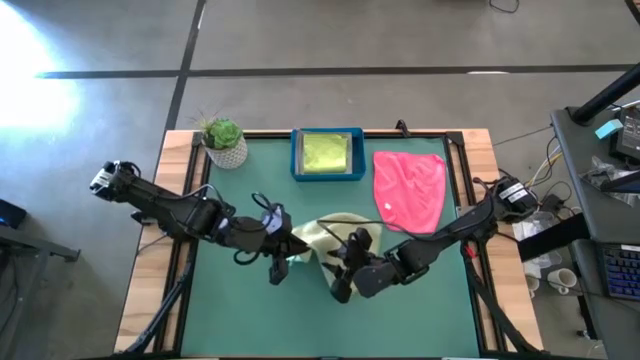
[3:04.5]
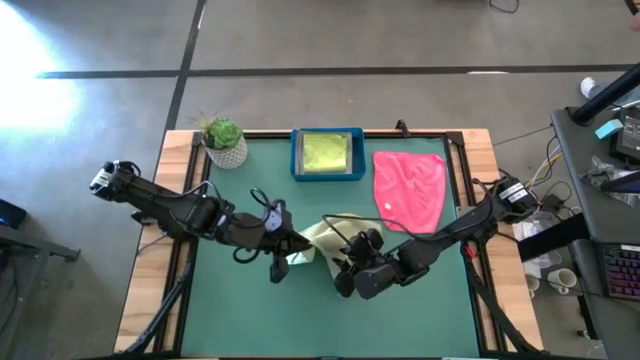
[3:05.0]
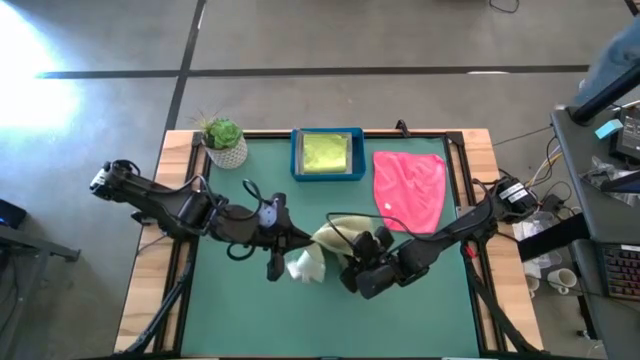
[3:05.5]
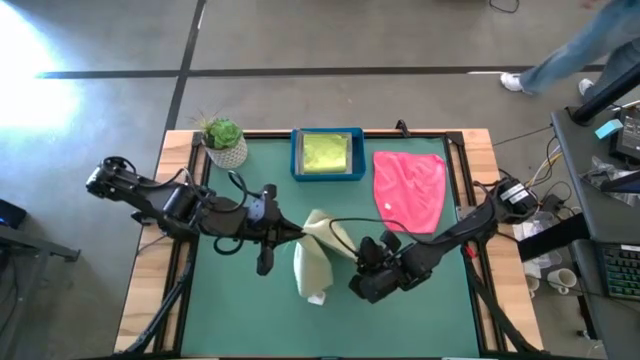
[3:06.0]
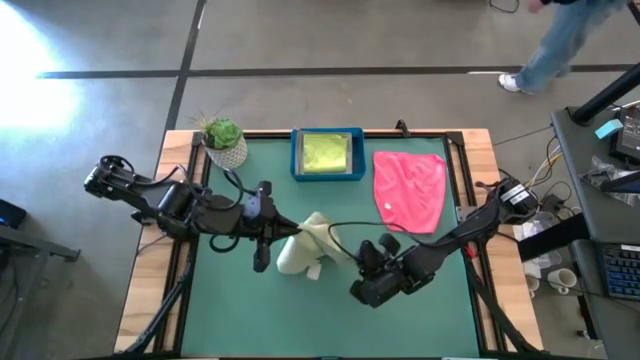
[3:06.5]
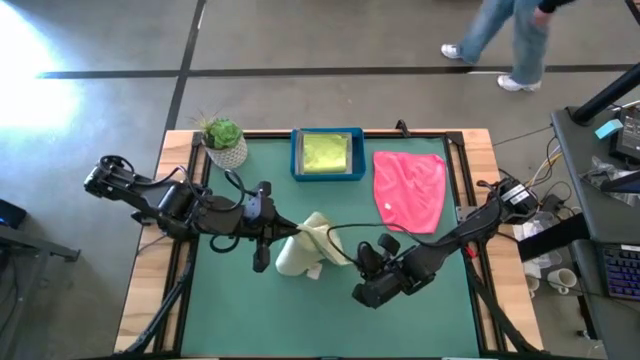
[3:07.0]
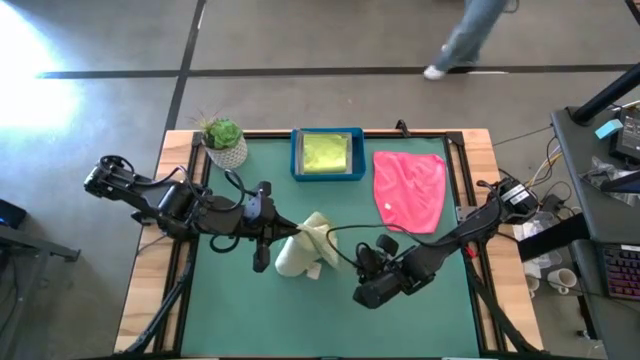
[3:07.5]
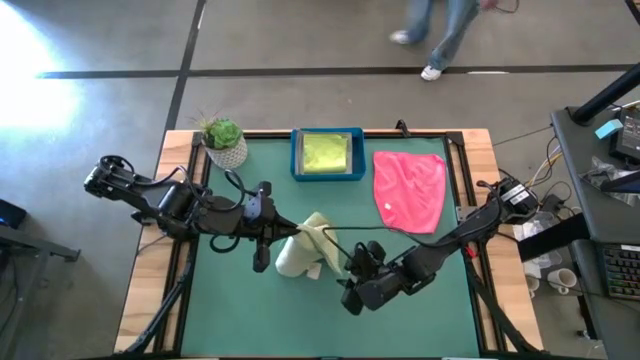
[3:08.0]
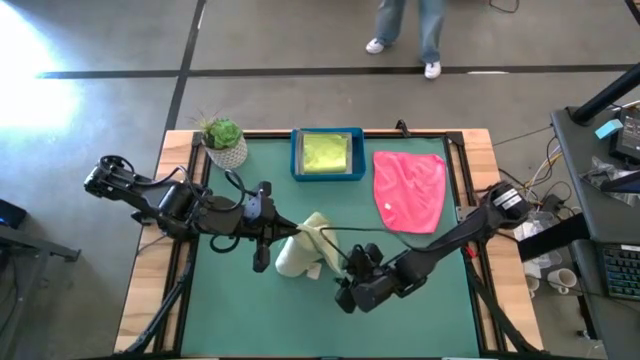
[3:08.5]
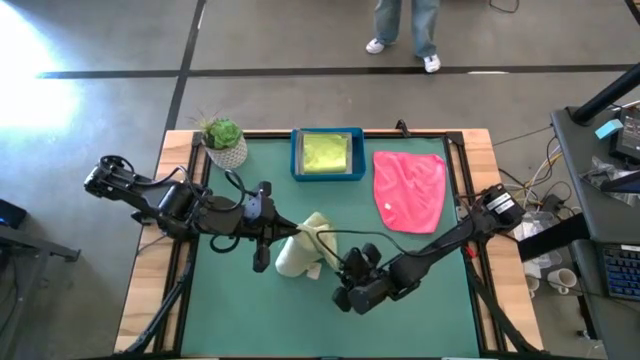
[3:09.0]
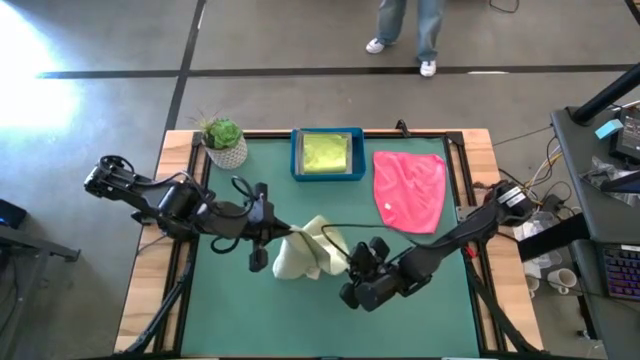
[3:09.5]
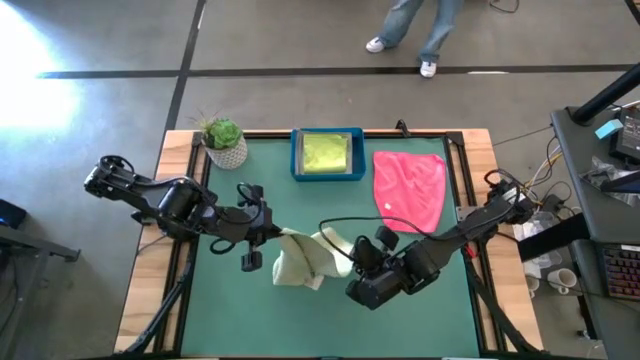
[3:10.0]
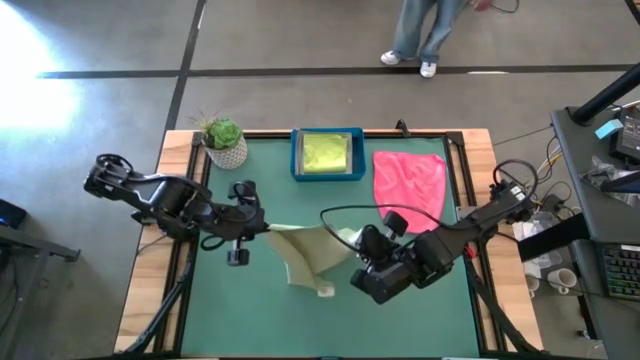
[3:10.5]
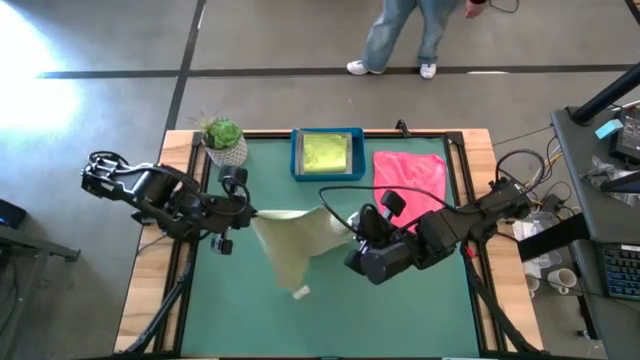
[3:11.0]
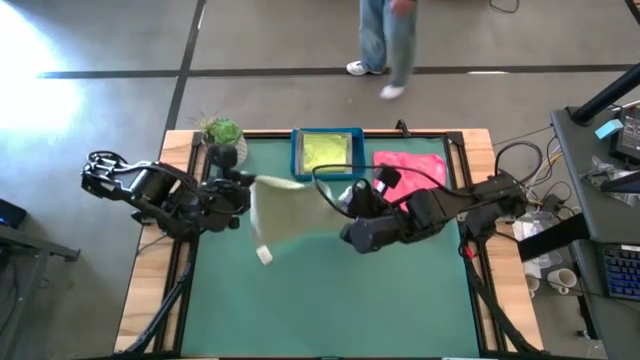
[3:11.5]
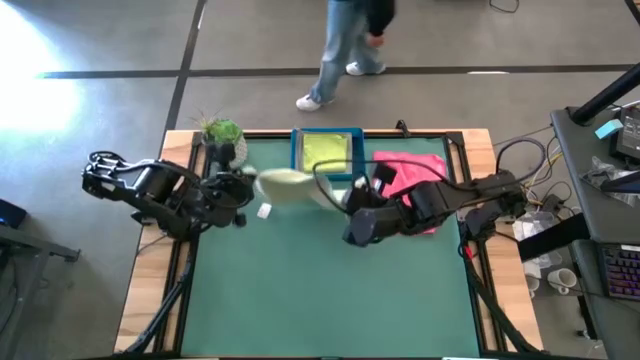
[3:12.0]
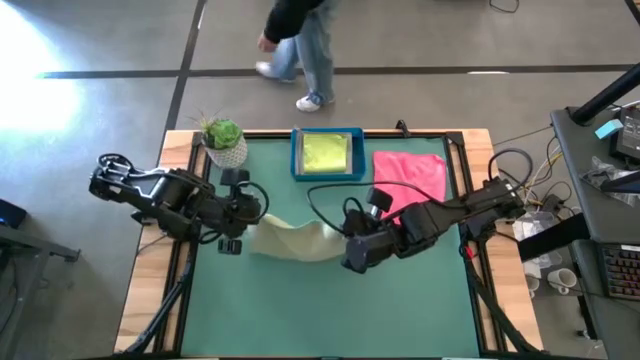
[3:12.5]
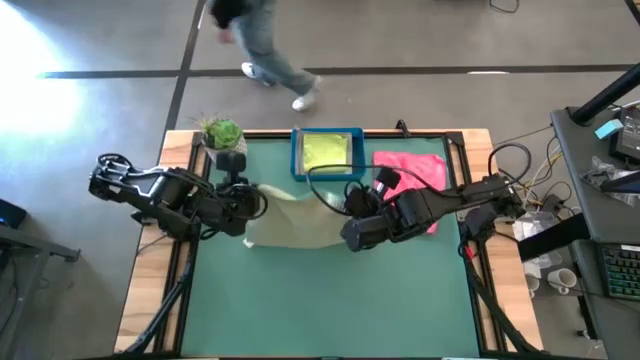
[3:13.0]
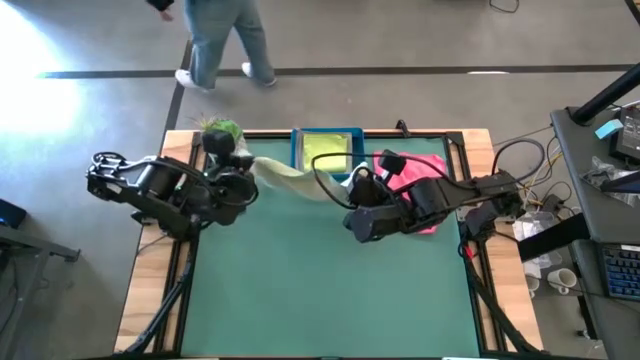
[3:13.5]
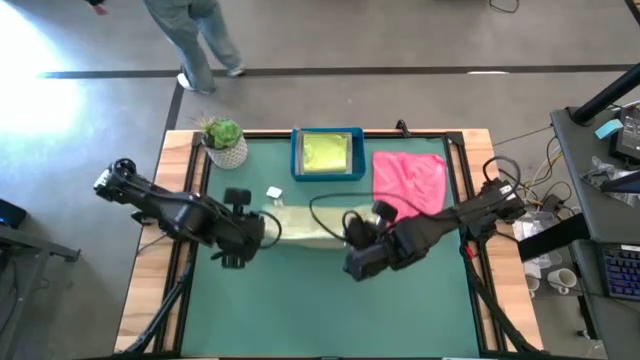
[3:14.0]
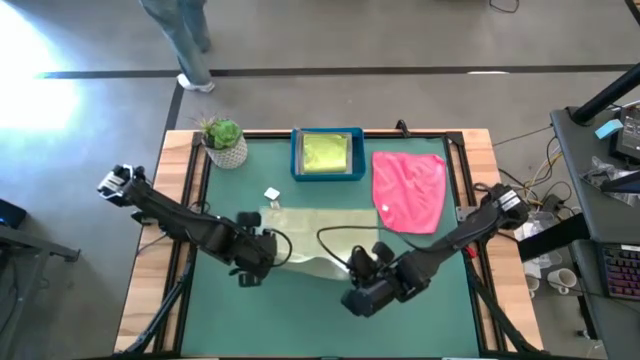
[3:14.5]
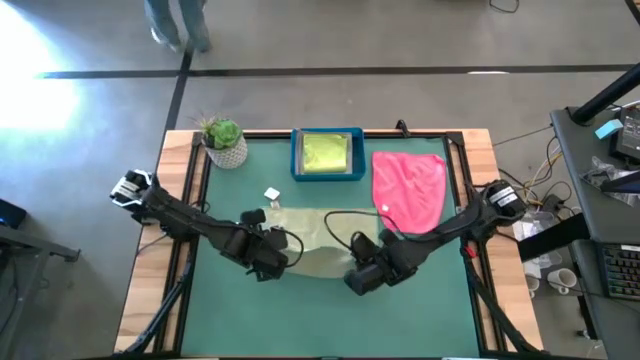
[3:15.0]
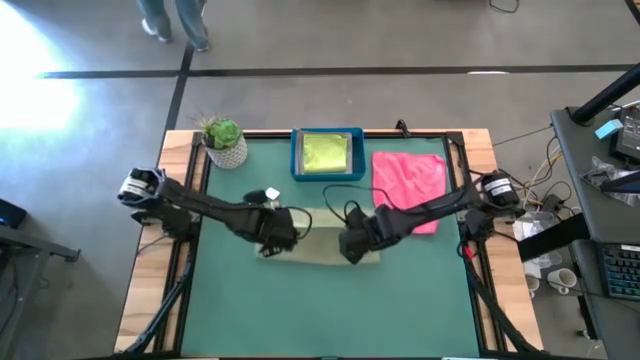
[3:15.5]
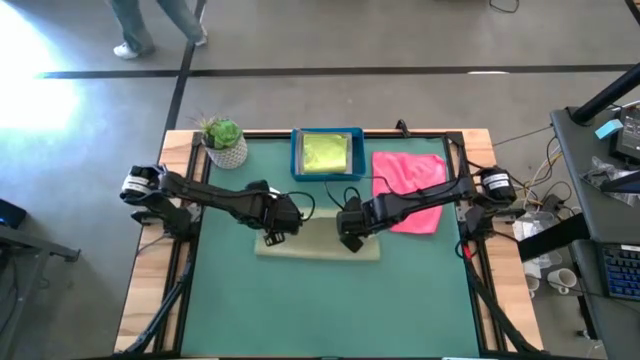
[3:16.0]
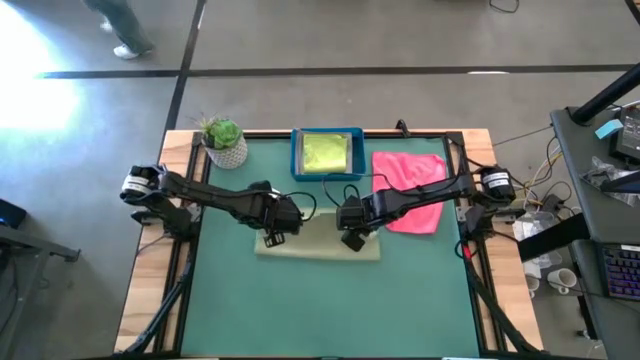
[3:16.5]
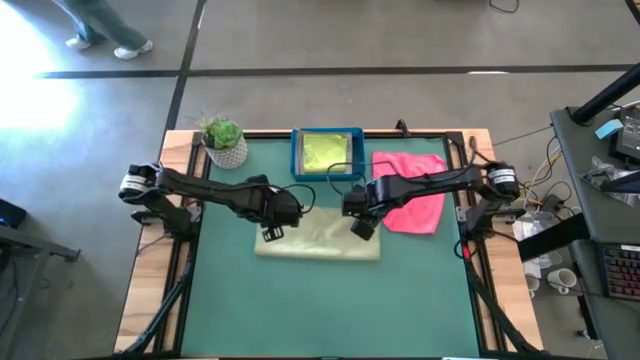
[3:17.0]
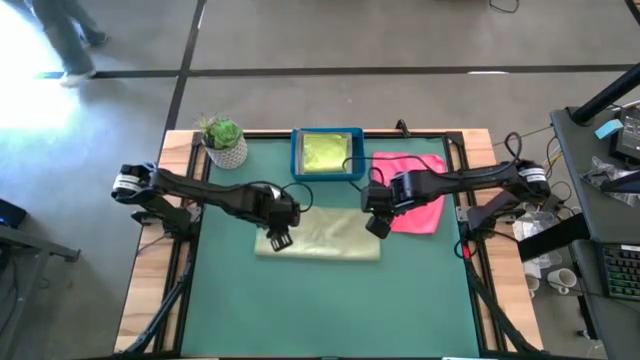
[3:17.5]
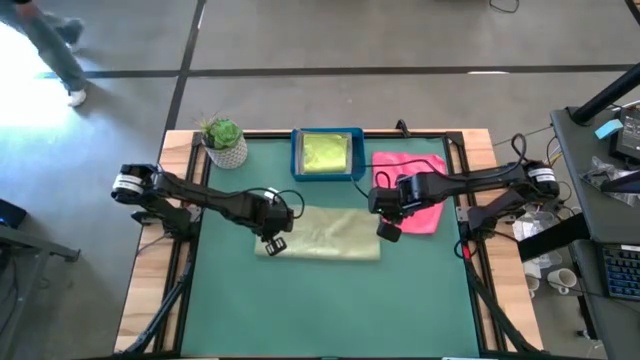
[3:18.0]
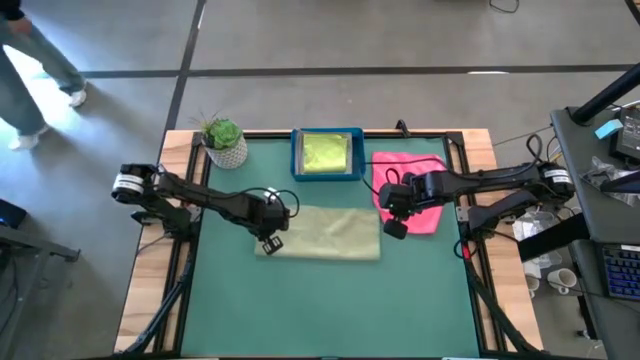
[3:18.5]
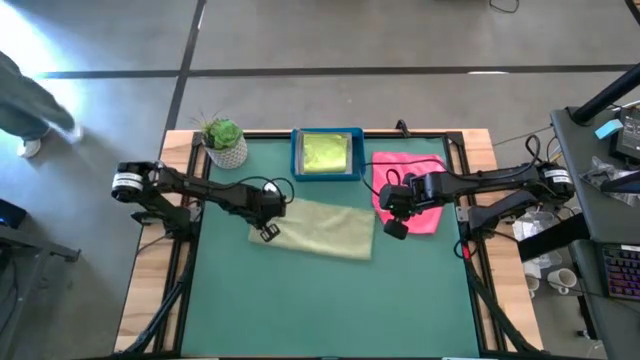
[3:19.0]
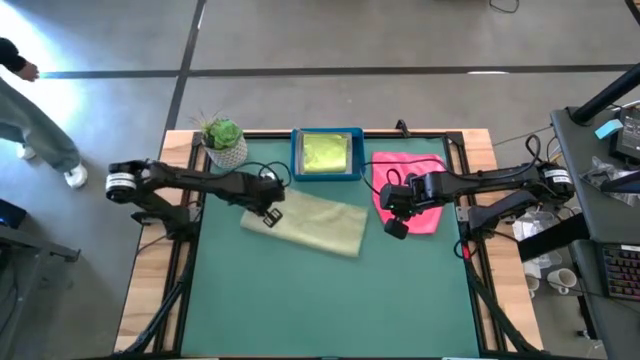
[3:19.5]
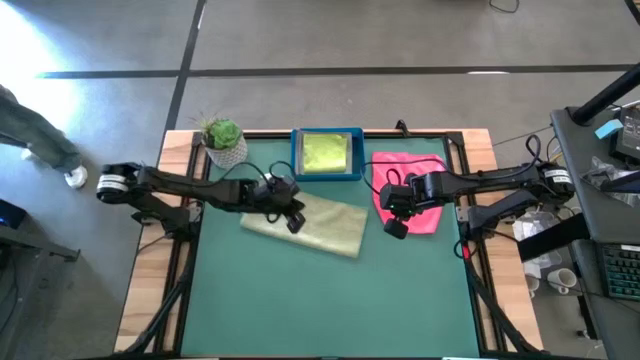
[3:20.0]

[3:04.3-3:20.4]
Task: Fold microfiber towels
Fold the dark green microfiber cloth

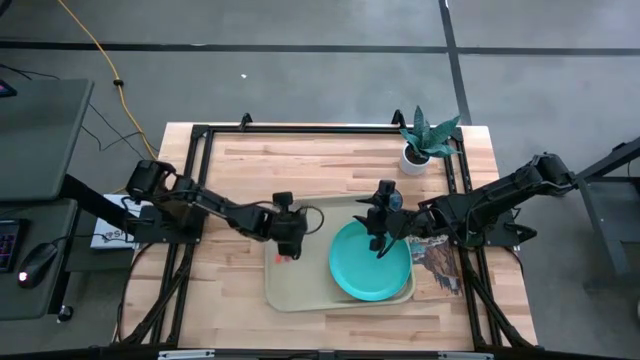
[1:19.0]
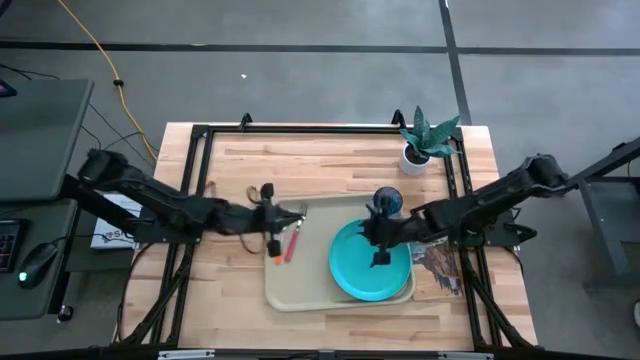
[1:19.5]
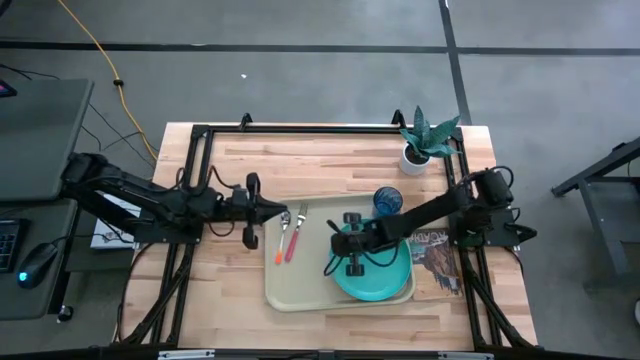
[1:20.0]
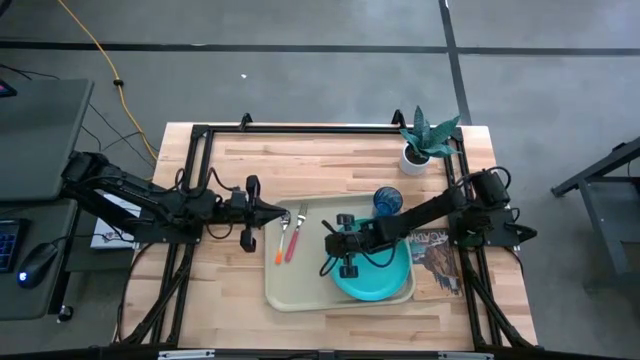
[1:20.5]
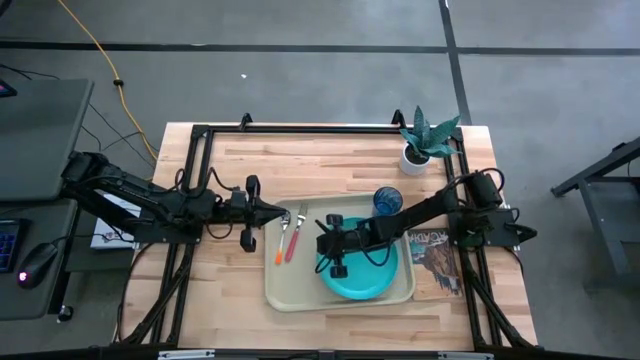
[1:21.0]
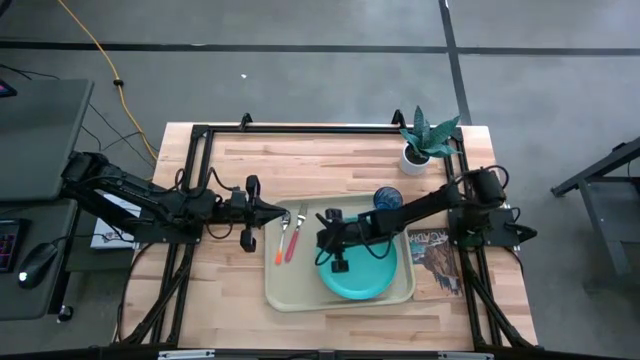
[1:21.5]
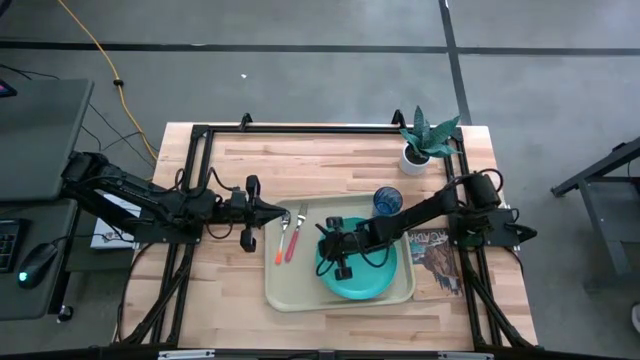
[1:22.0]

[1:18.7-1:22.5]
Task: Pick and place plate/cup/fork/spoon on tray
Adjust the blue plate on the gray serving tray

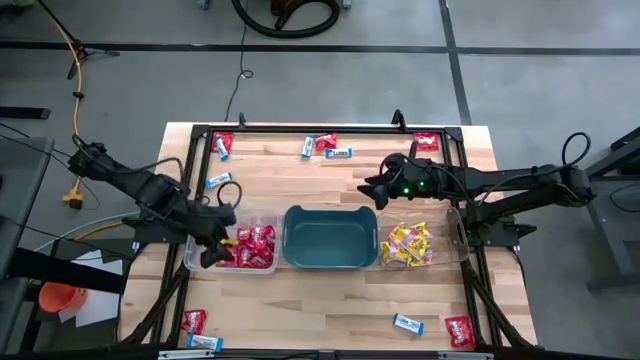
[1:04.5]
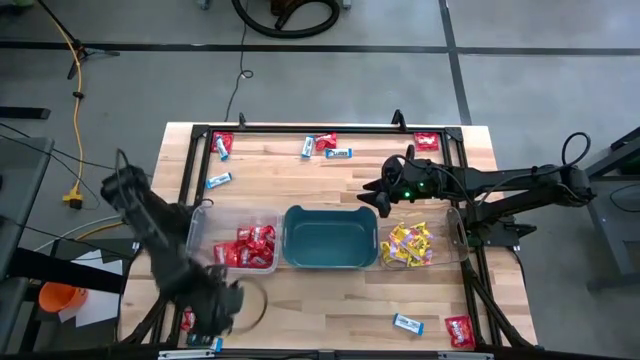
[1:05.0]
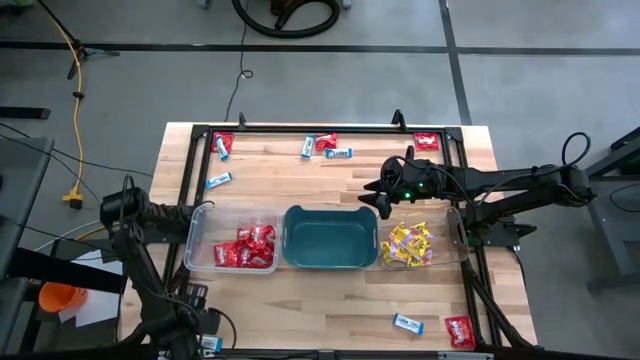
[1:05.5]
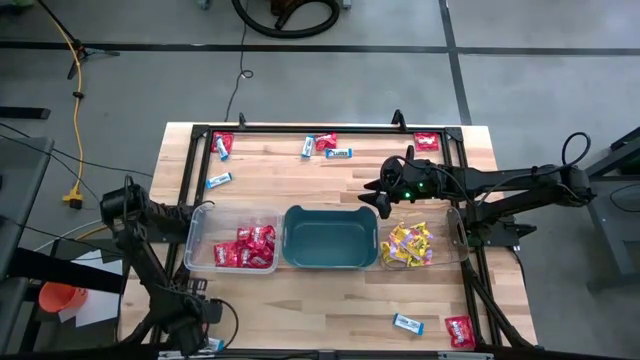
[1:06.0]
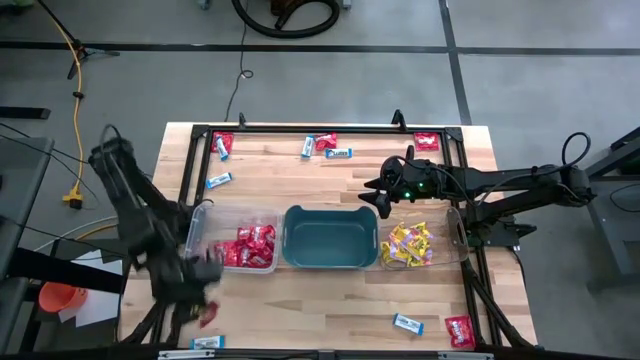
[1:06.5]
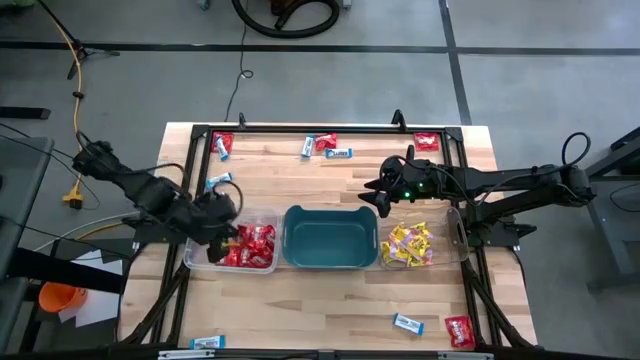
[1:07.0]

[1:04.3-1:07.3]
Task: Sort candy
Put the red candy into the left transparent bin
